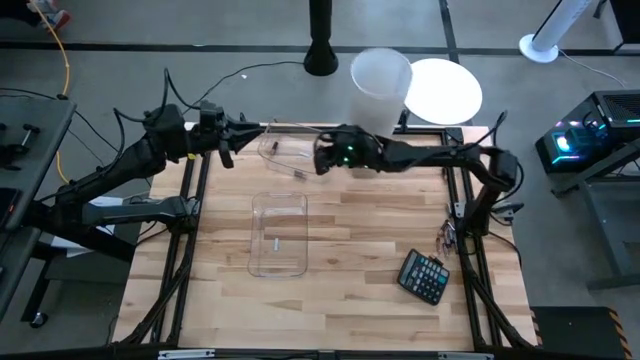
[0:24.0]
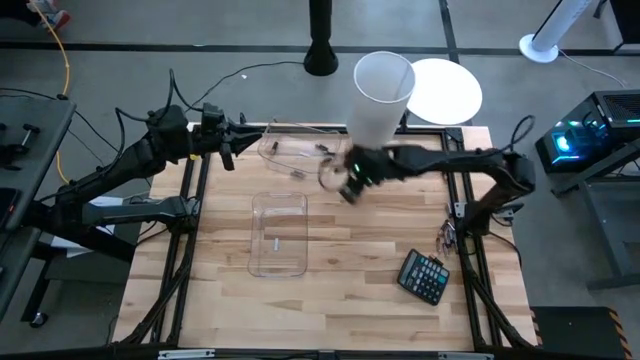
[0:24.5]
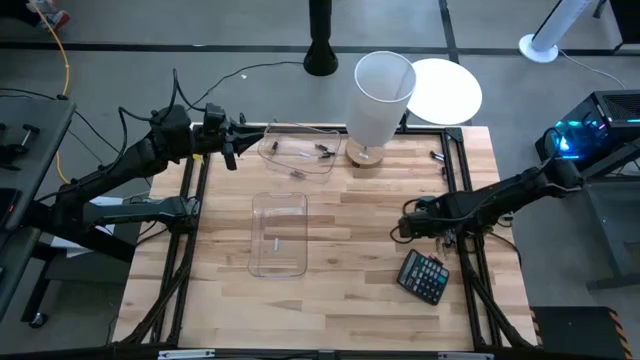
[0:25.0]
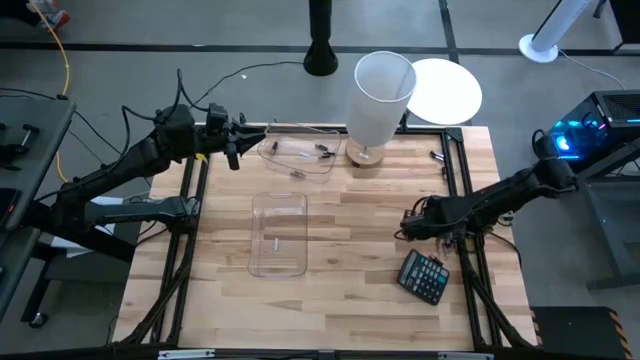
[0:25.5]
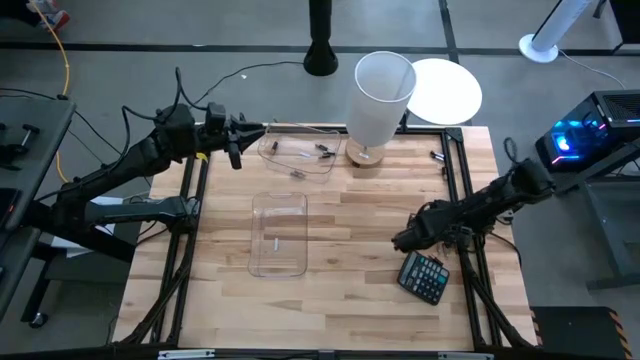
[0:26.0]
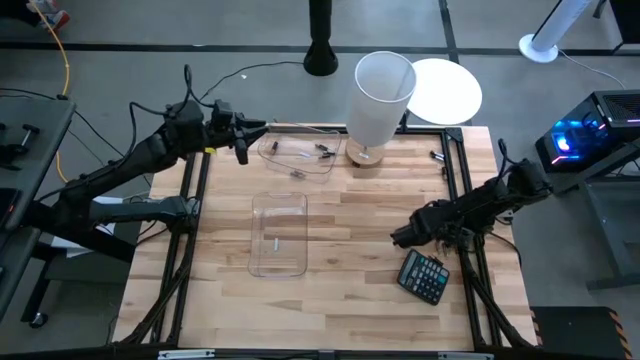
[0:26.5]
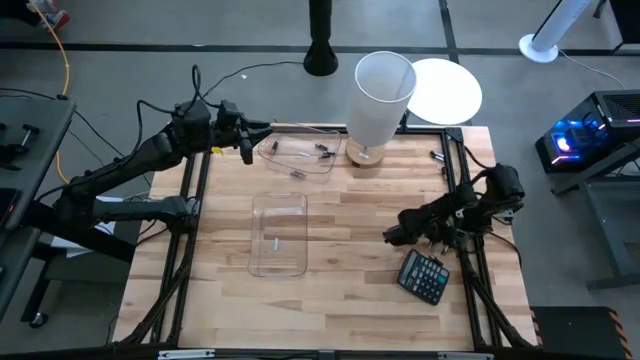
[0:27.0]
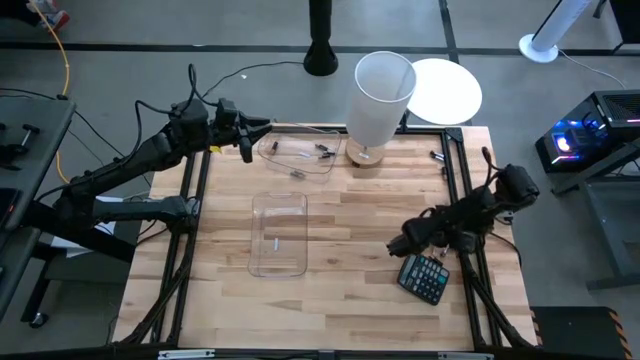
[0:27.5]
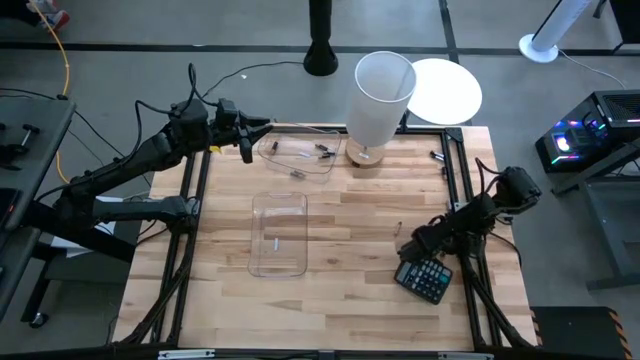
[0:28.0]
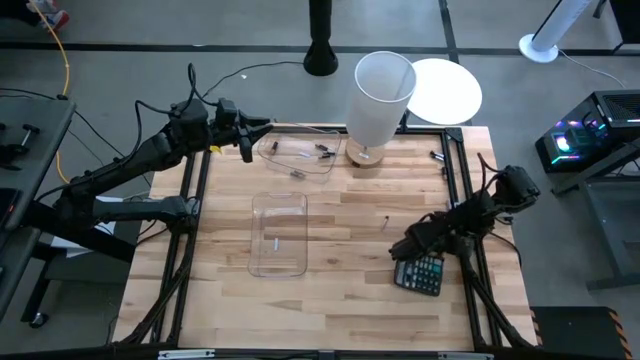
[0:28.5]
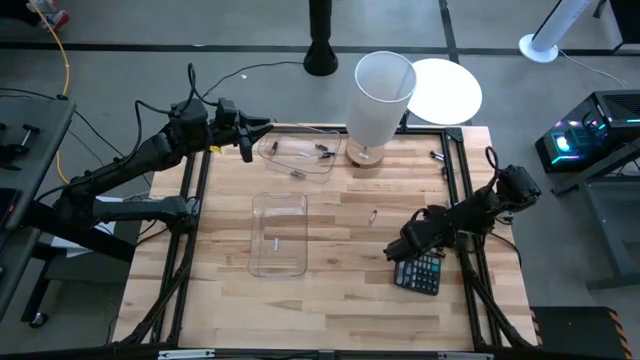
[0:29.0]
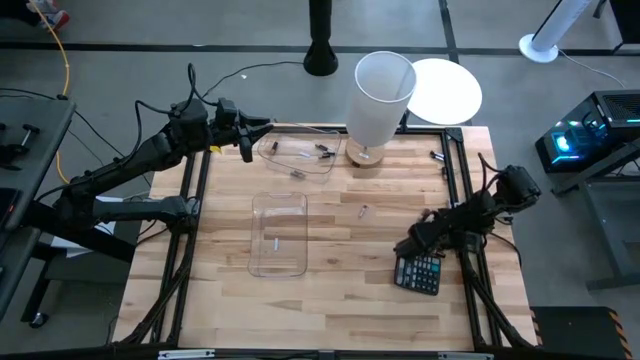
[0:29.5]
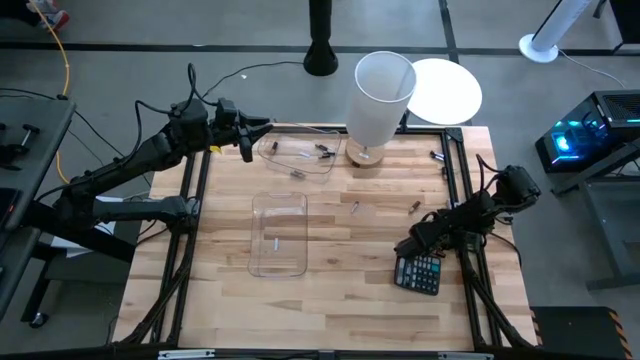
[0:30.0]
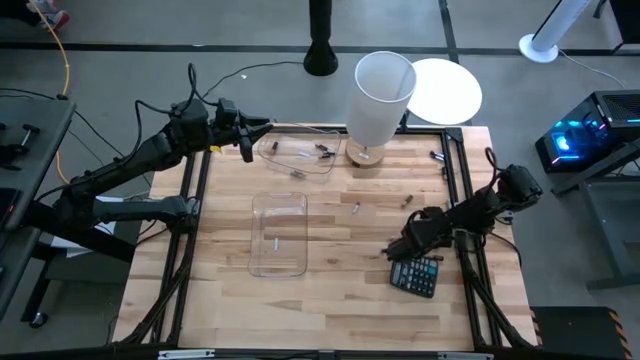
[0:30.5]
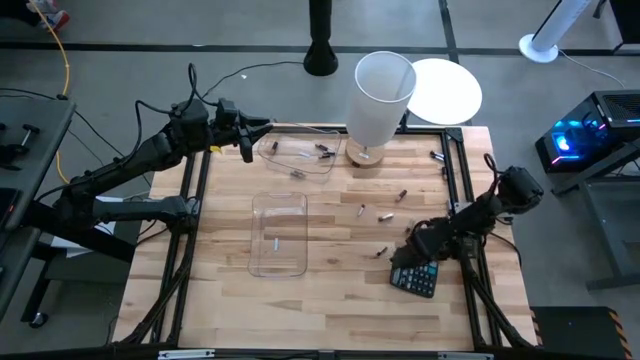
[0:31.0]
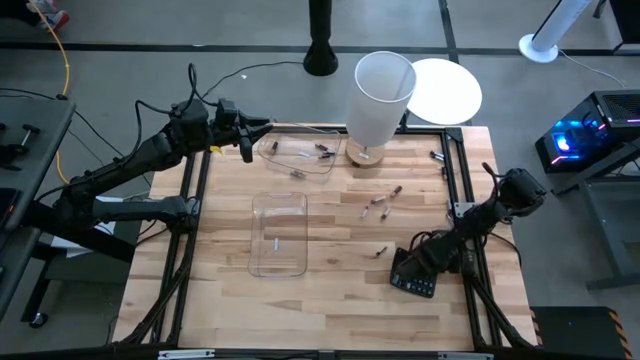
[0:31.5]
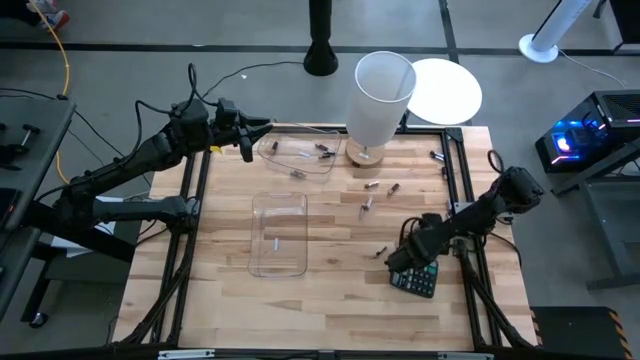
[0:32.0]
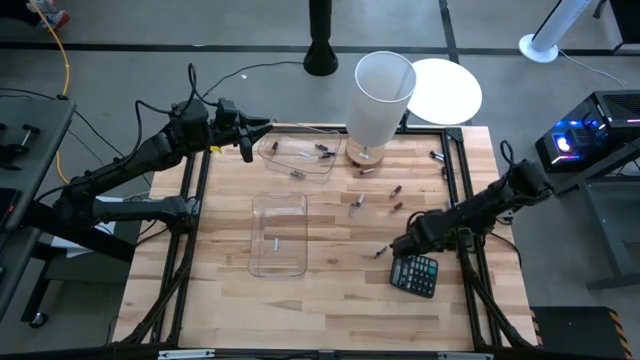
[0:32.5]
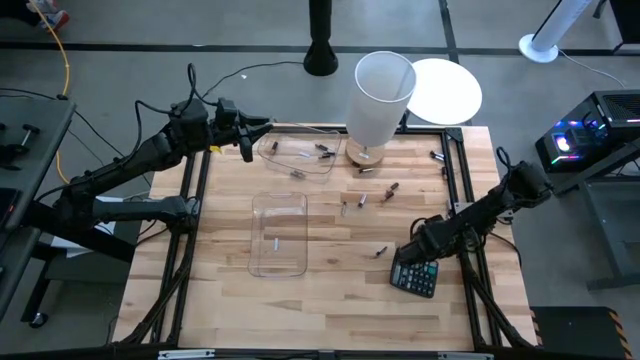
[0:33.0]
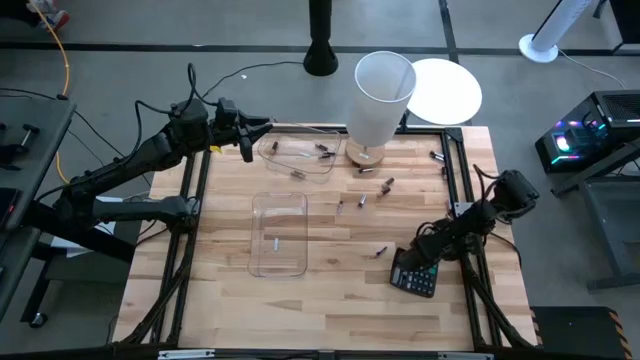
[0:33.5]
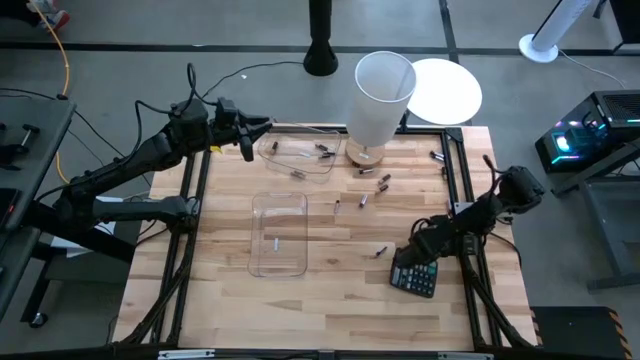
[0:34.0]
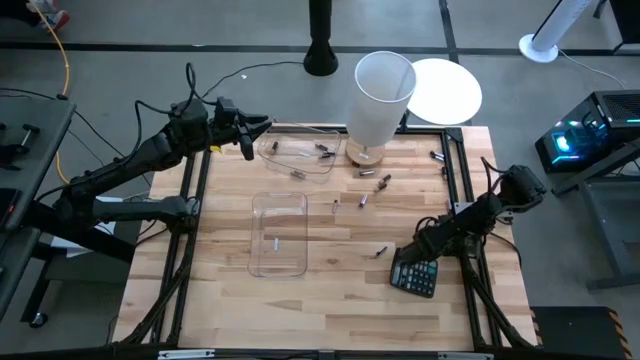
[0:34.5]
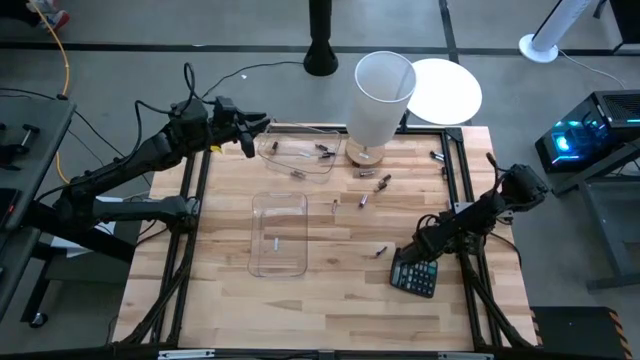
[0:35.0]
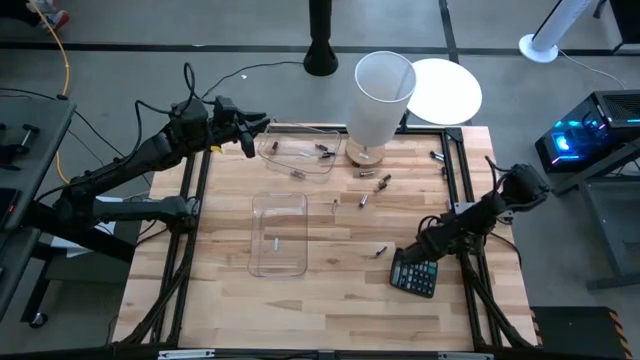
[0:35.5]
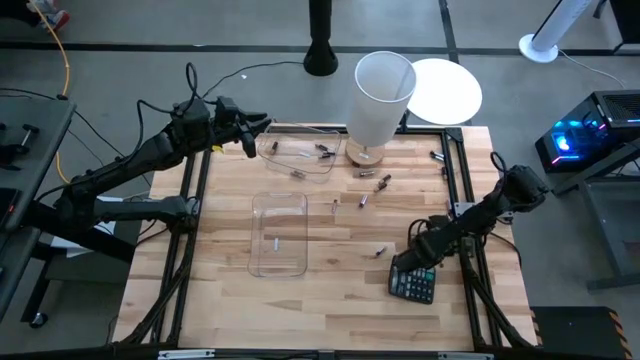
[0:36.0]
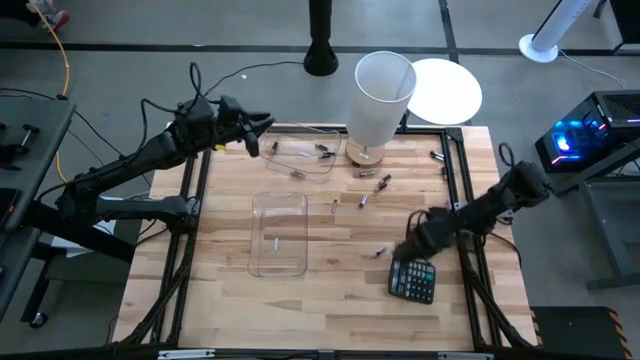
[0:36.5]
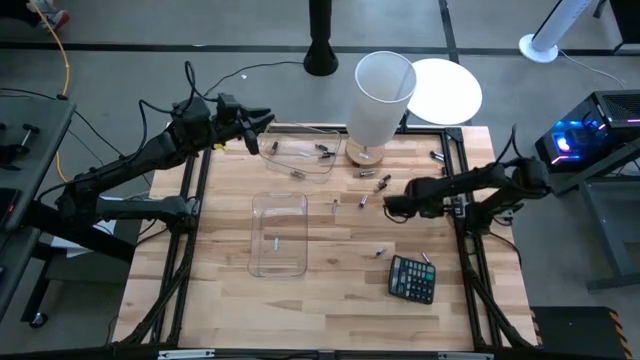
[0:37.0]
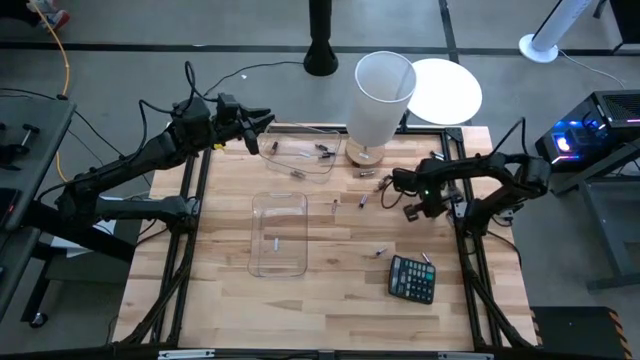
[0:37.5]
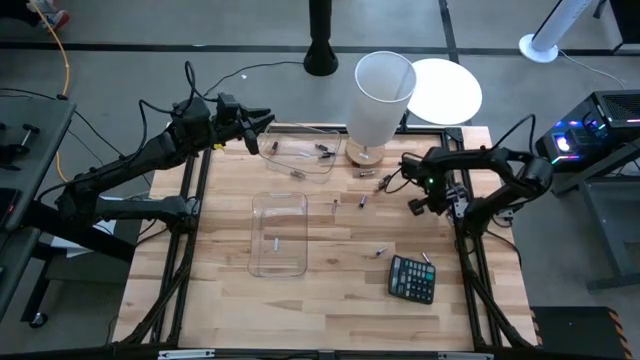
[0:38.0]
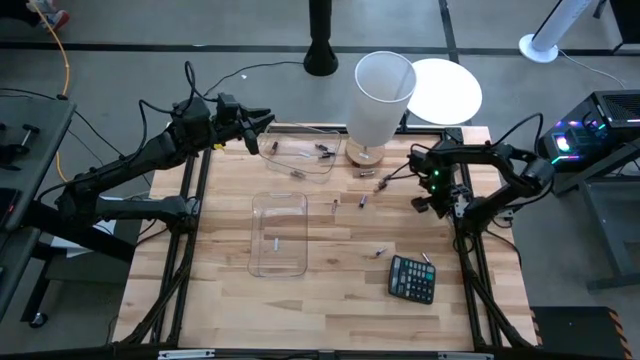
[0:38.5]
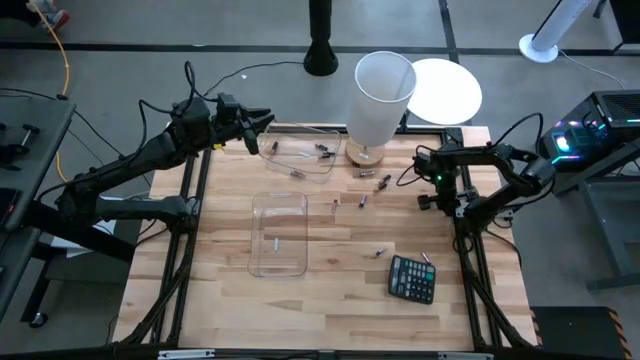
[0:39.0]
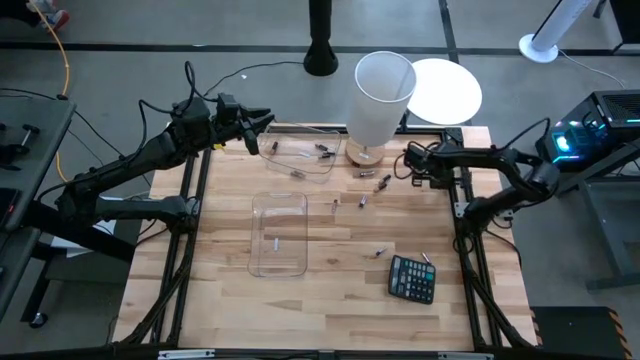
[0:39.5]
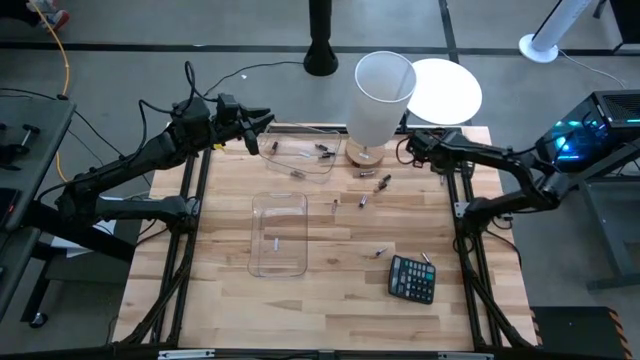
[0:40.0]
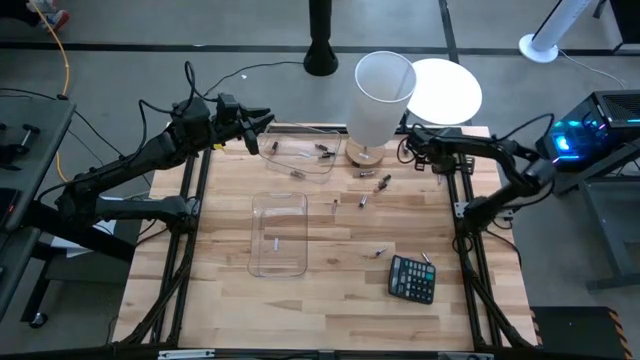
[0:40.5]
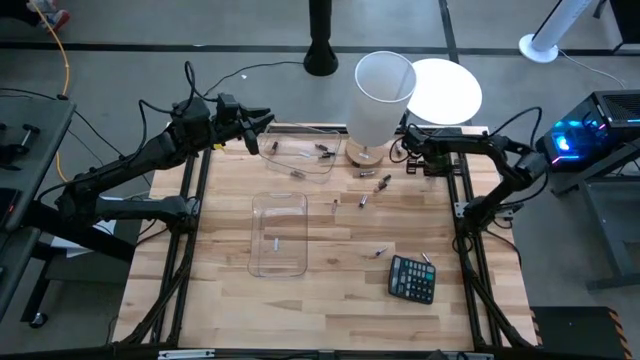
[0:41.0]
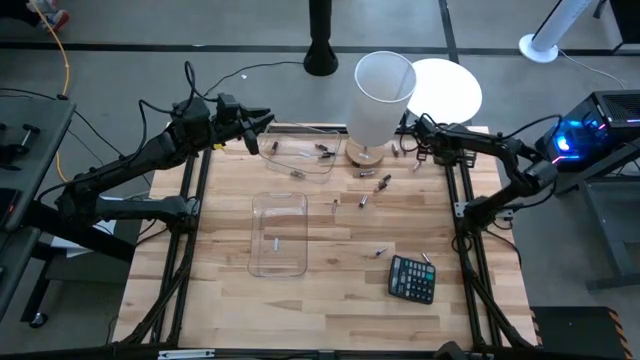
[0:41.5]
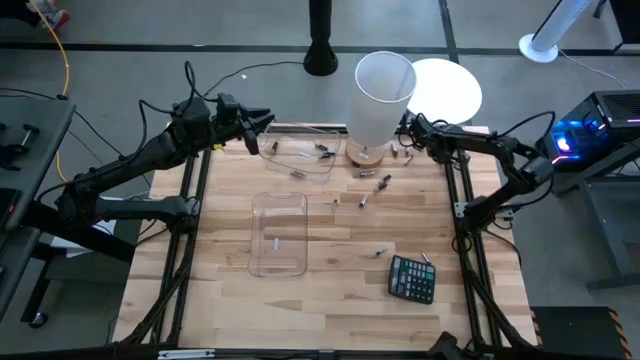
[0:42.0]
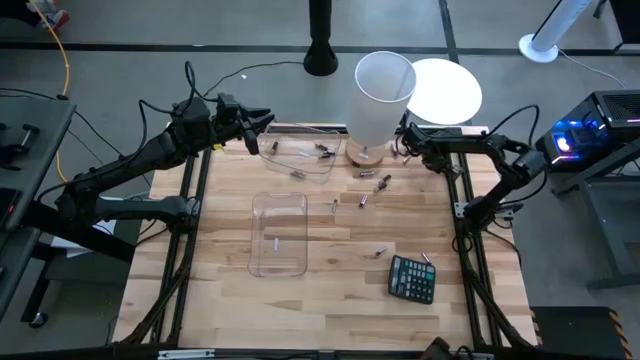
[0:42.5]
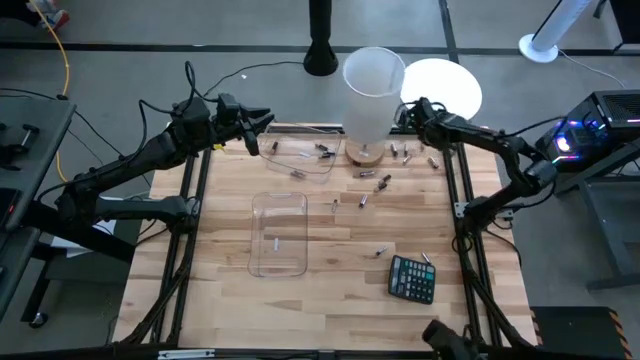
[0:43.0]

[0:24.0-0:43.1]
Task: Sort batteries
Adjust the batteries

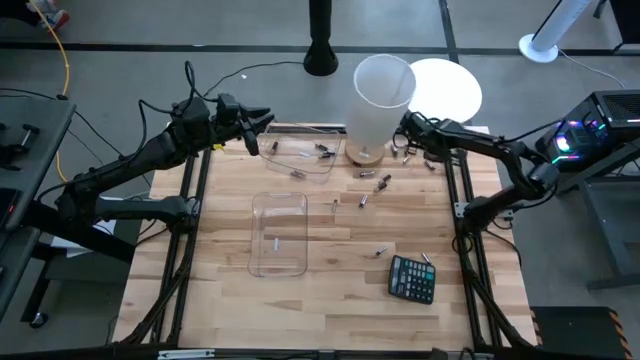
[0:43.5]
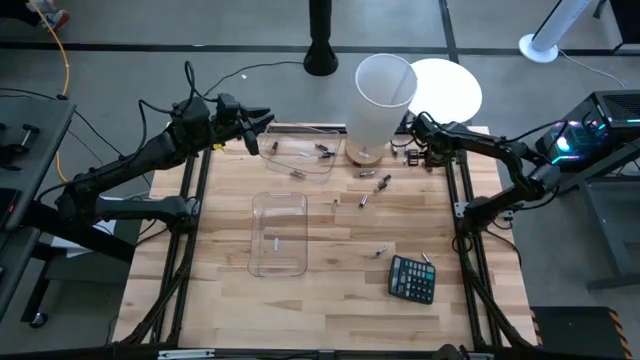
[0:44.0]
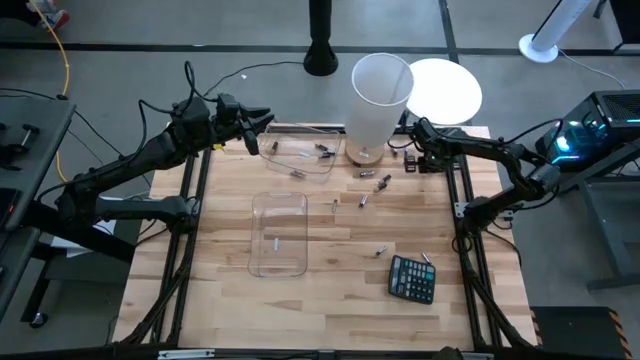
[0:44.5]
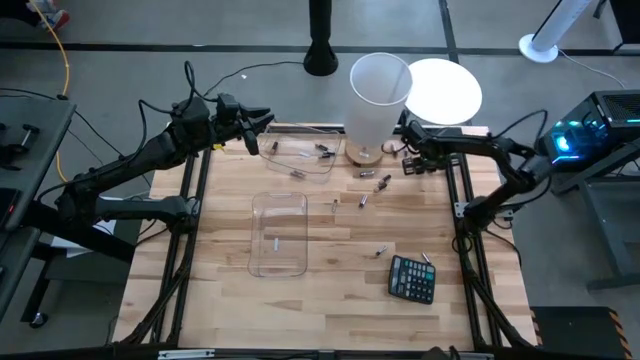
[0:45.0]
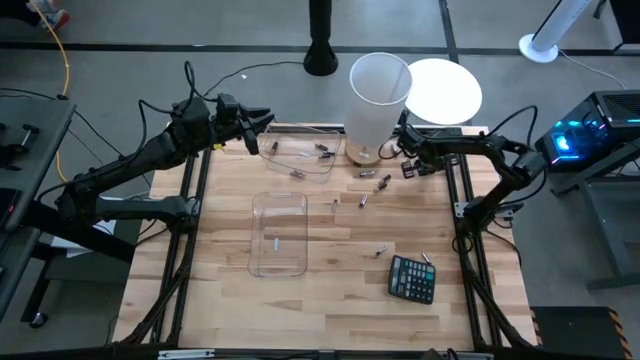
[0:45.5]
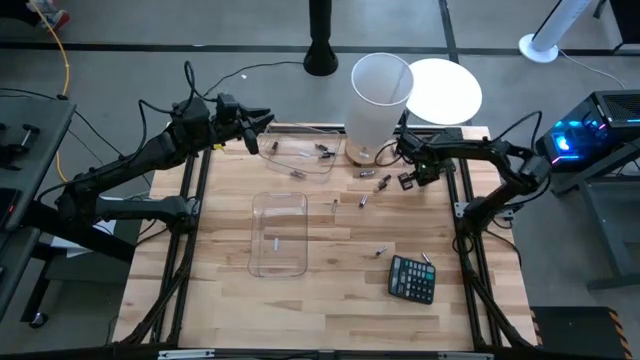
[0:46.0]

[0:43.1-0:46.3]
Put the white battery into the bottom transparent bin
